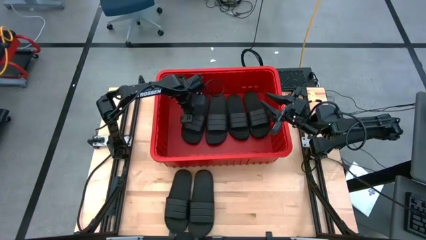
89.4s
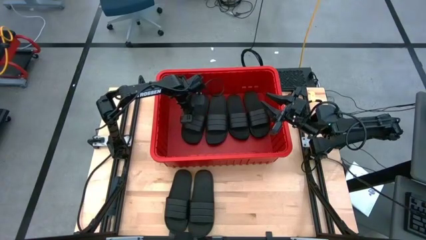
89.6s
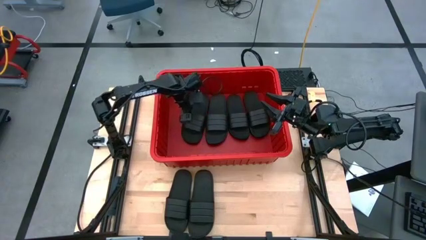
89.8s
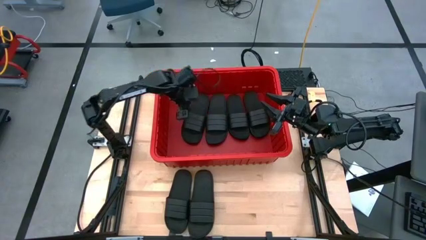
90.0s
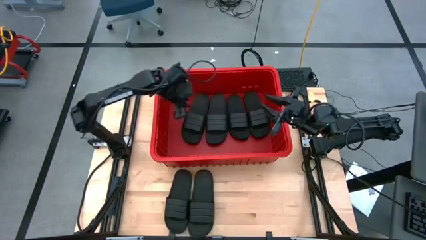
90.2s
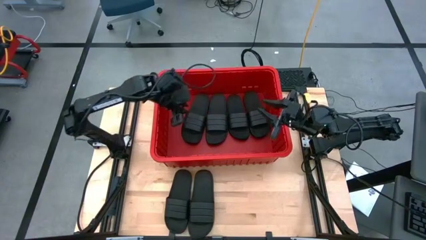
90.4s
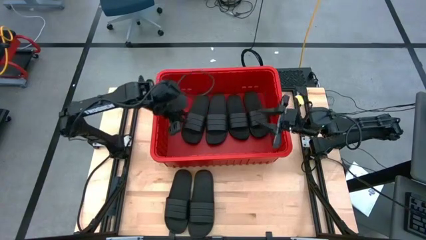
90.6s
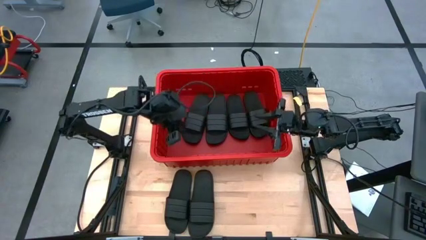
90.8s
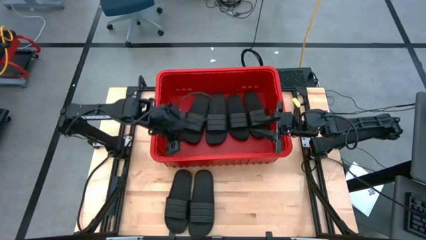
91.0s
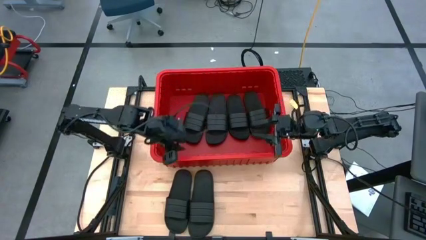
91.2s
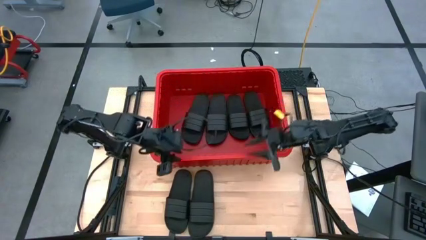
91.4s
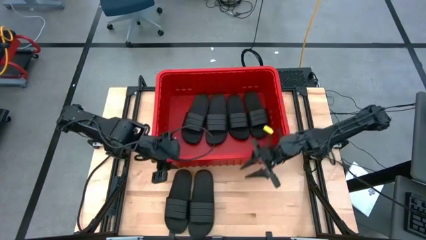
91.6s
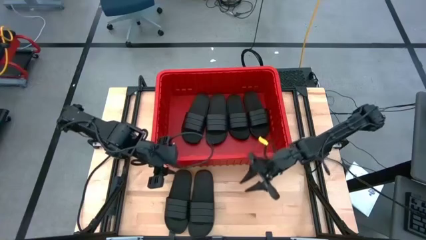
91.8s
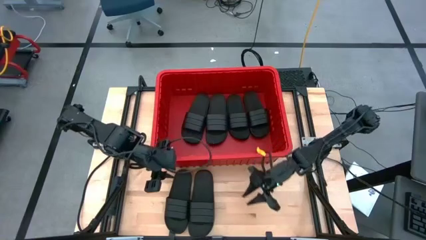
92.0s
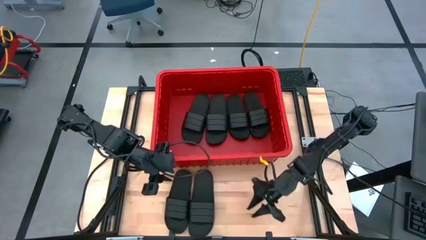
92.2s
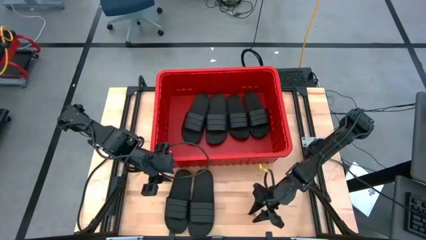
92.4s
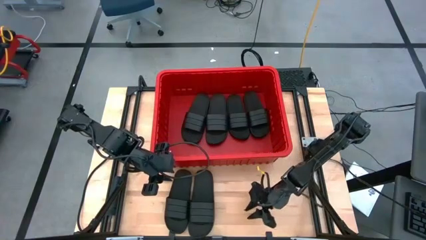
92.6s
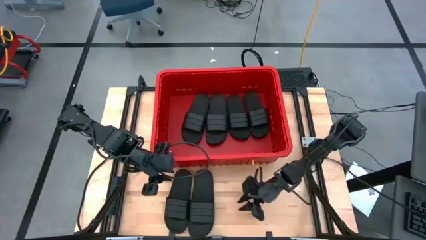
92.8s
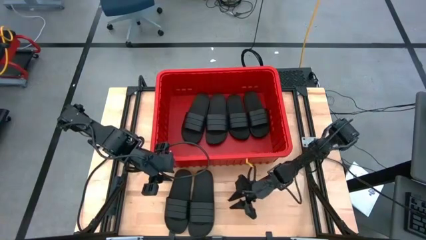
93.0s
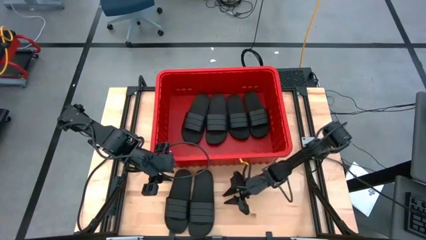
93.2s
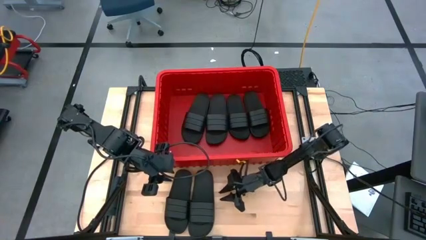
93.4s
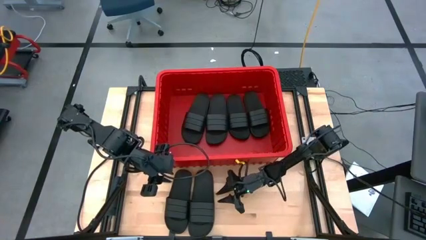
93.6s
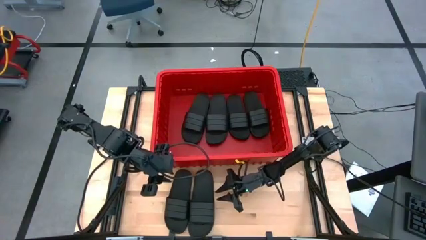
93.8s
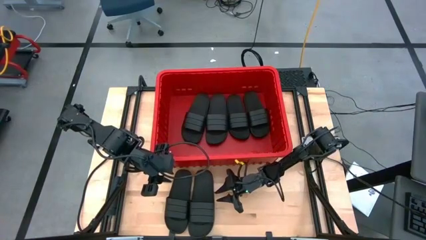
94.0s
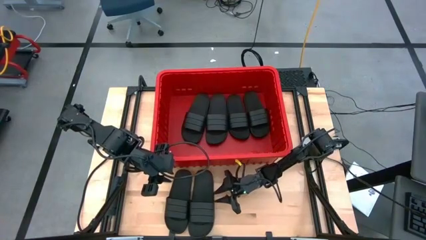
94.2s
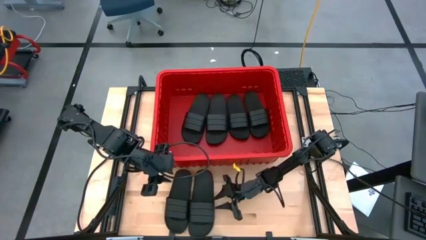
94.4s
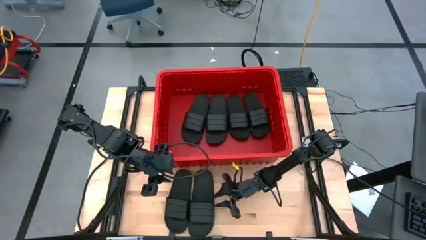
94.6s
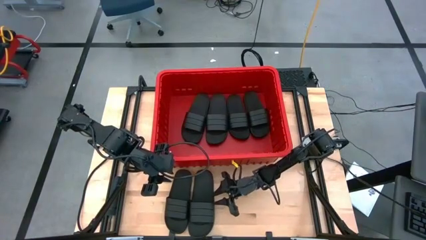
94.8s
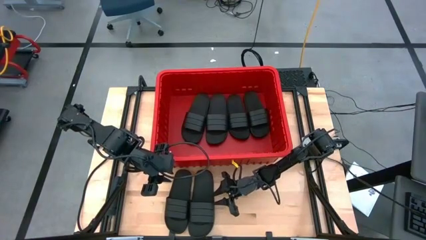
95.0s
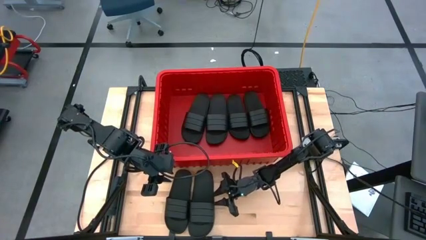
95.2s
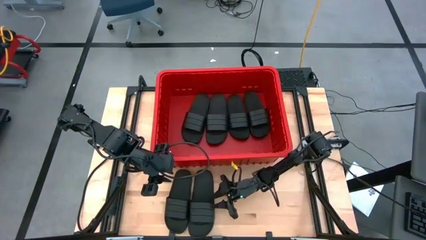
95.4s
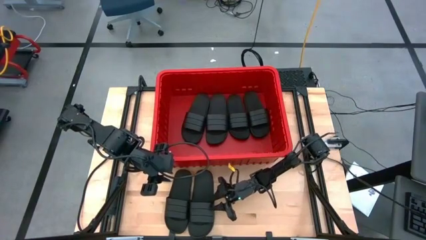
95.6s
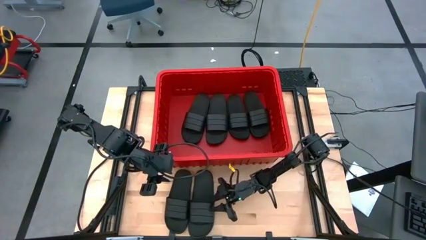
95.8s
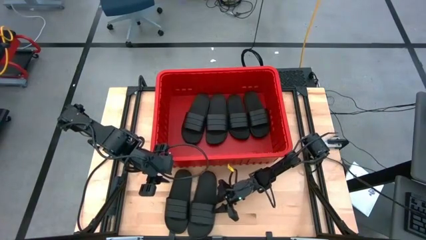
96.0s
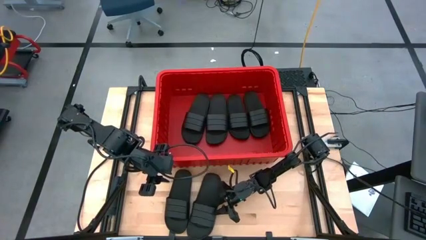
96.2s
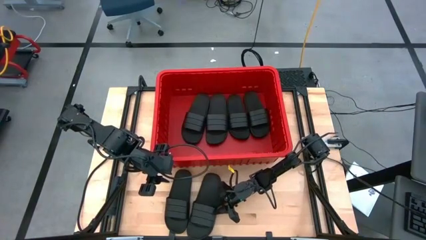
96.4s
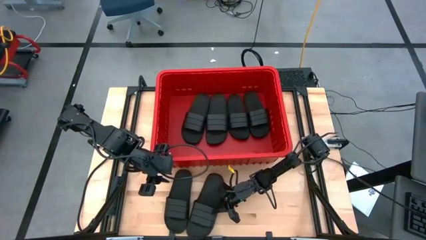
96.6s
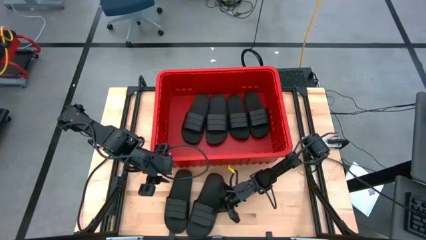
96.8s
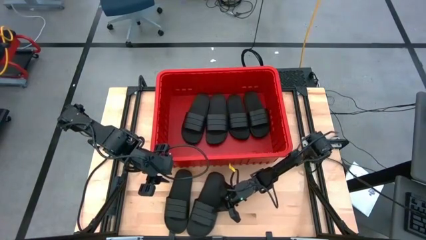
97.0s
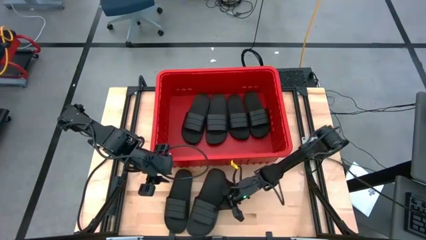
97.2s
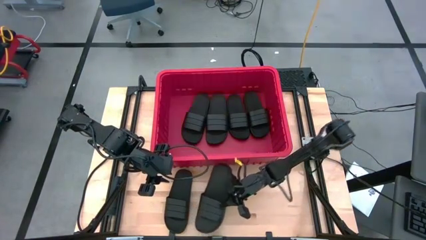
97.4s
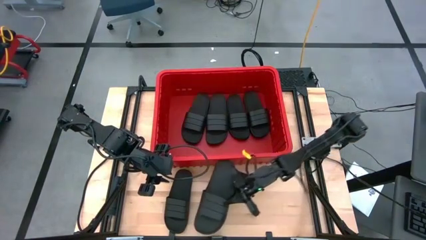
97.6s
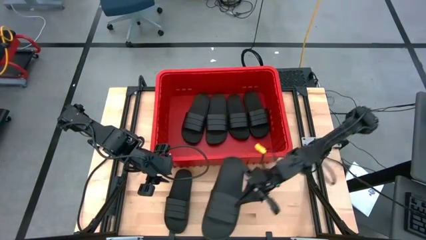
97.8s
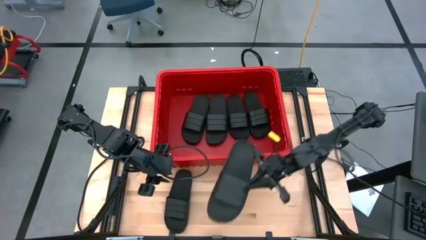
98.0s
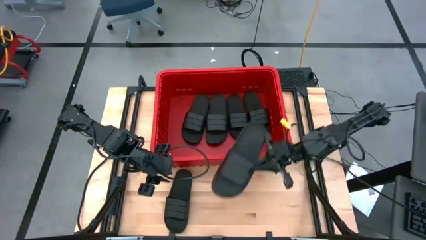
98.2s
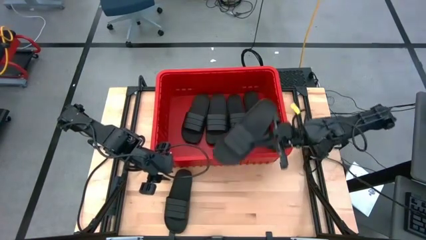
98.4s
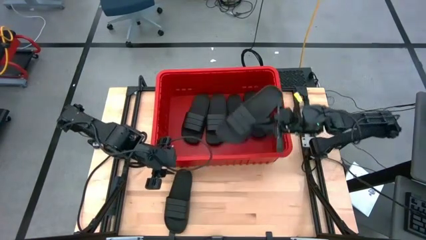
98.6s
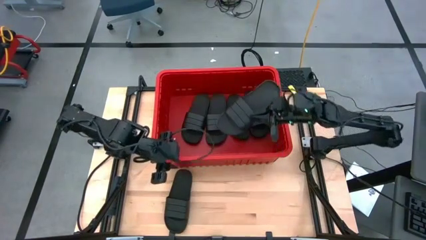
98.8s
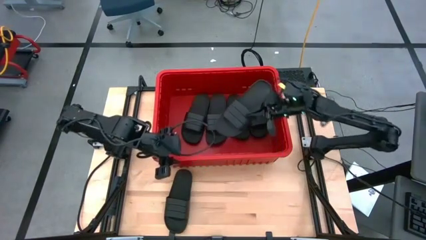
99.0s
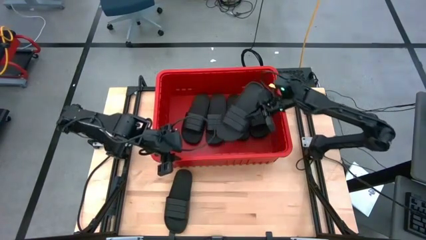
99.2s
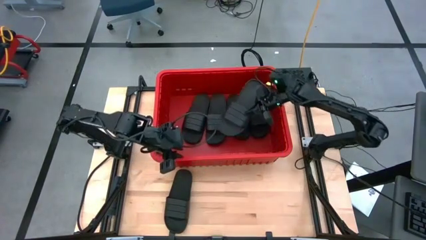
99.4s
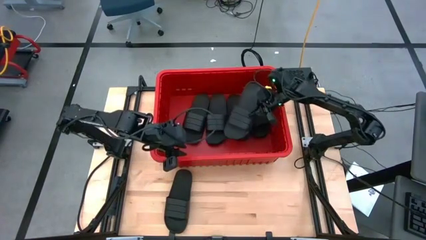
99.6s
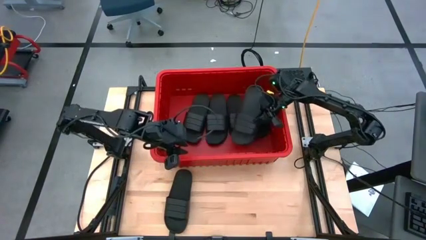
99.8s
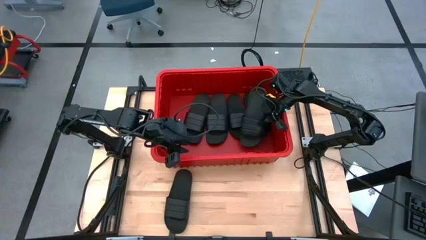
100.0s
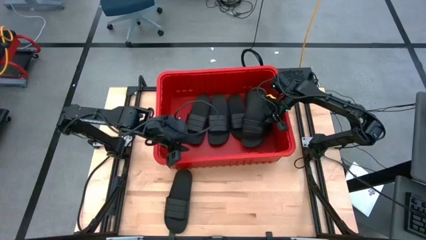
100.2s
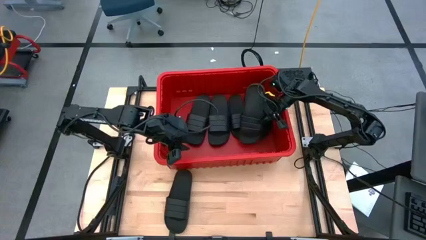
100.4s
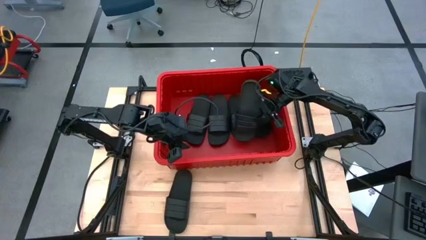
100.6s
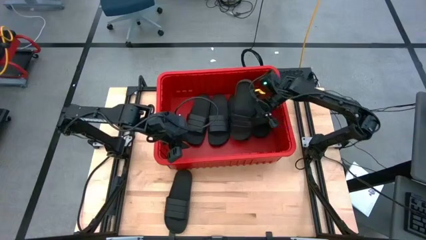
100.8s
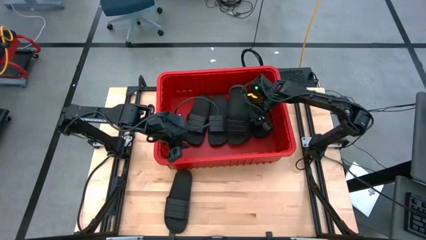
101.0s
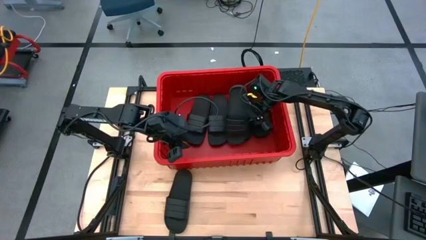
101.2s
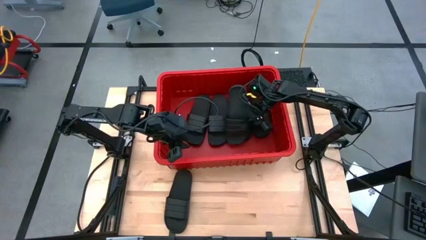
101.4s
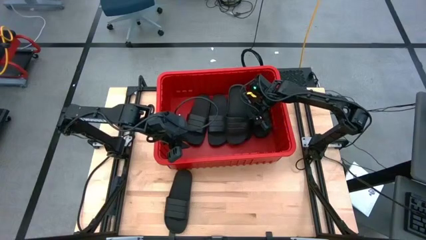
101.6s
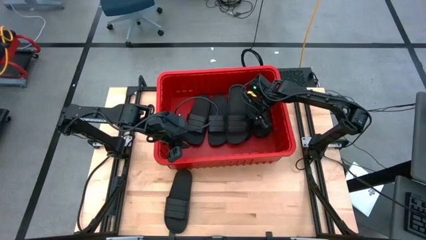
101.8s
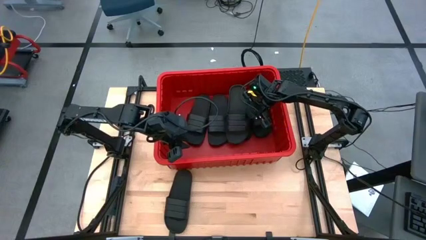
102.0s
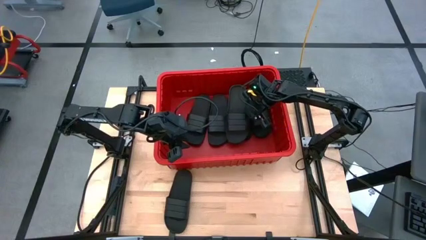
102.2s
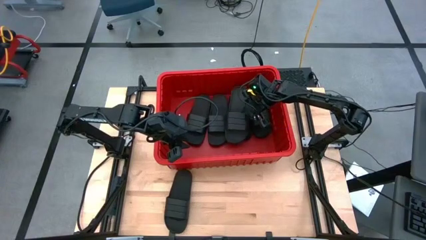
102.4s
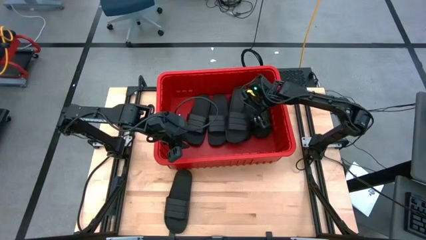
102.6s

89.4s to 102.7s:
Task: Pick and place slides into bin
Put the black slide into the red bin
